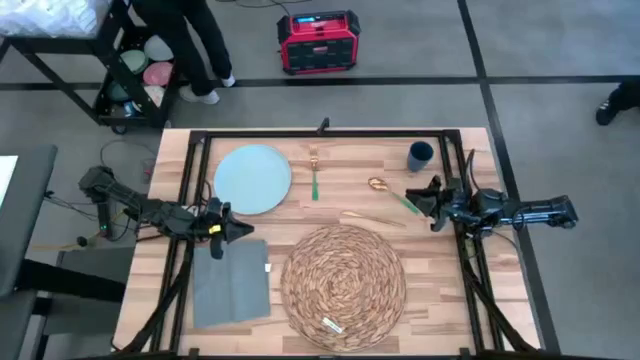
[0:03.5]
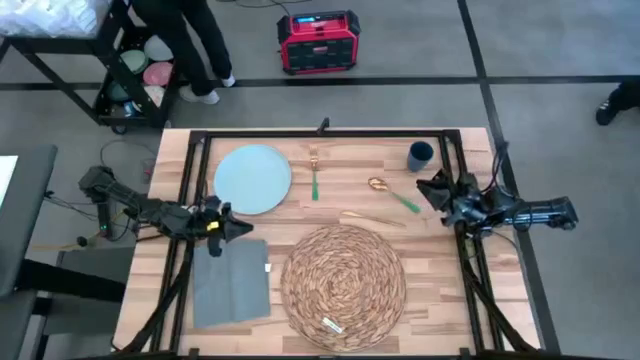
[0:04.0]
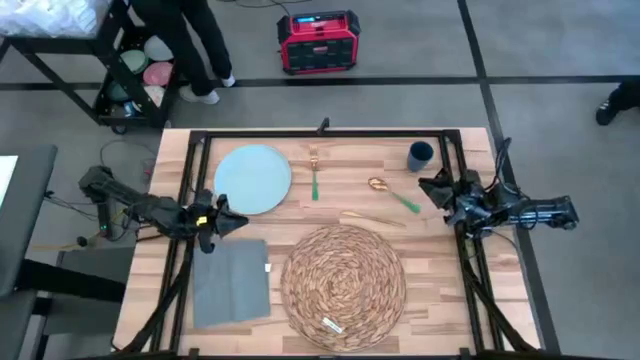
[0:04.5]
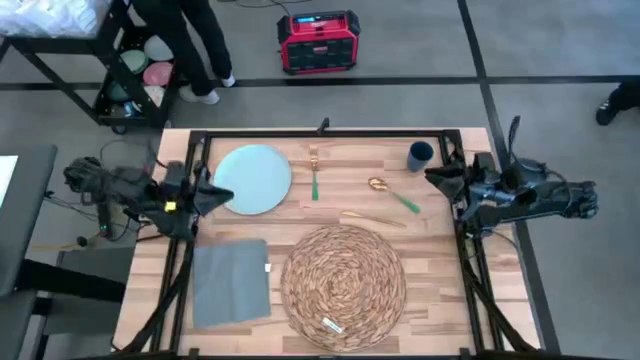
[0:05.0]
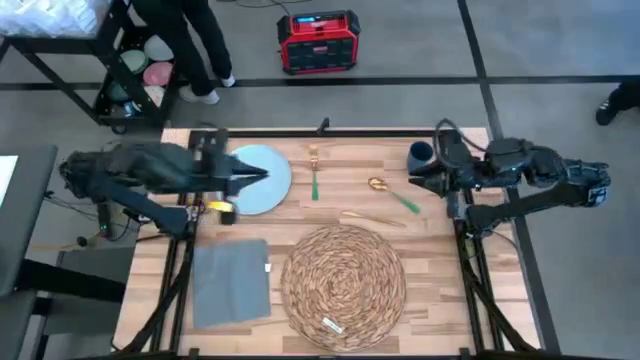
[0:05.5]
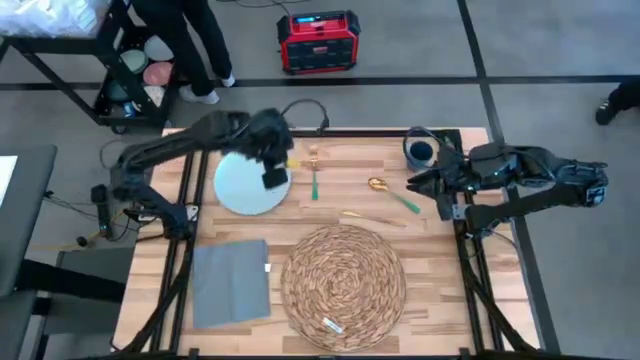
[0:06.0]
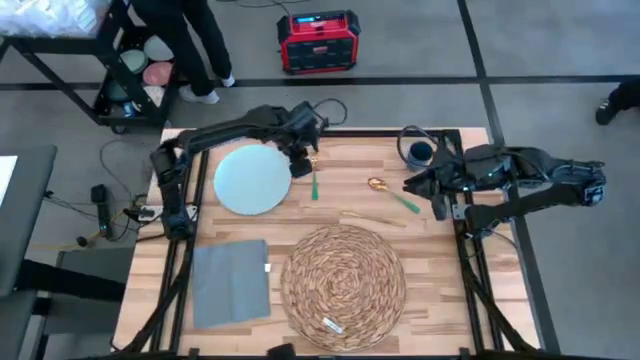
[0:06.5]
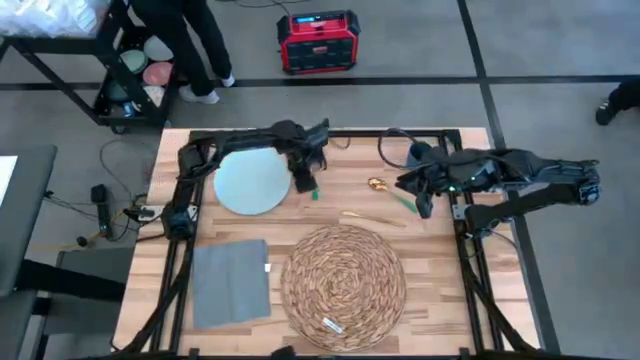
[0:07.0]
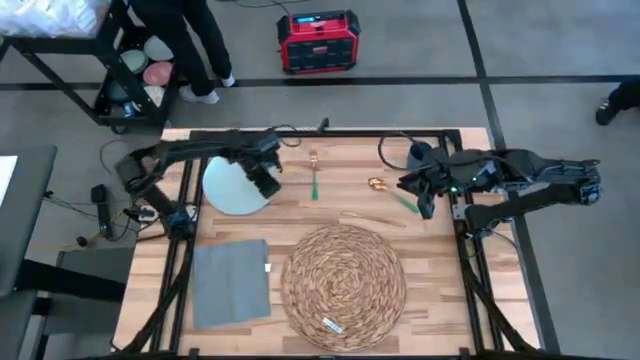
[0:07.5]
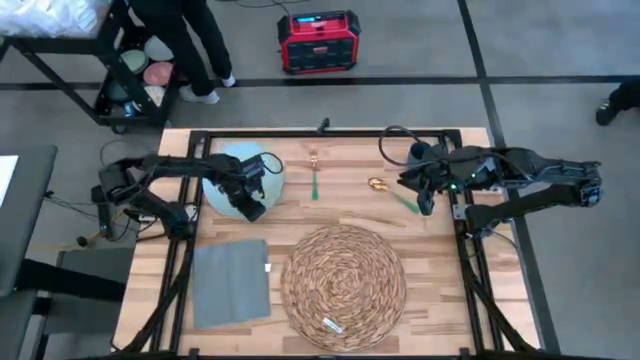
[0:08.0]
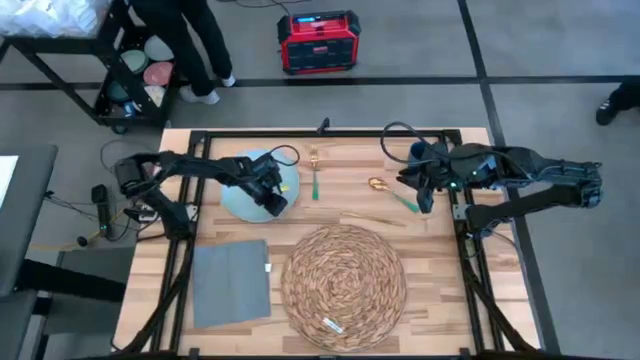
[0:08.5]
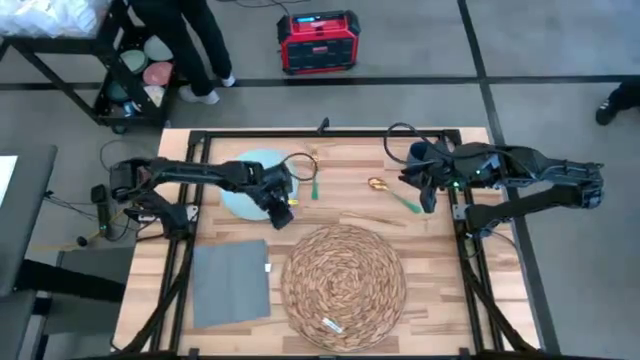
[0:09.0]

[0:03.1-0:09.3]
Task: Set table place
Adjust the light blue plate

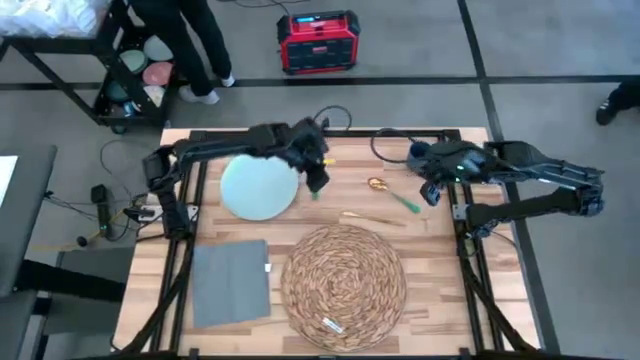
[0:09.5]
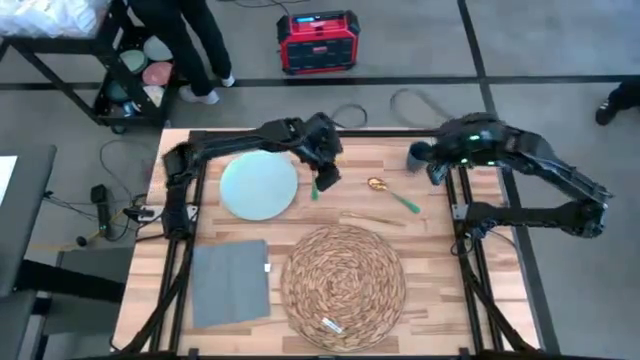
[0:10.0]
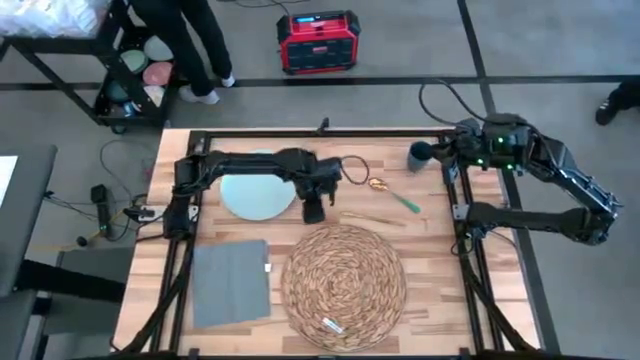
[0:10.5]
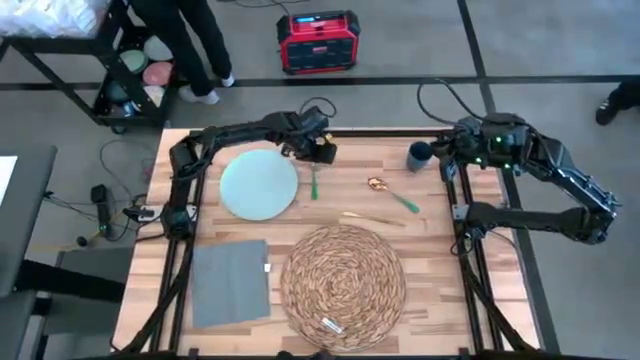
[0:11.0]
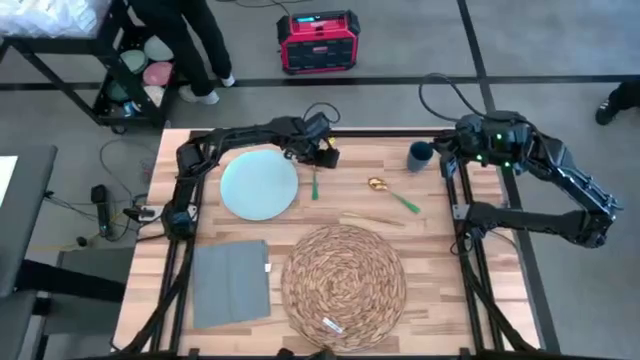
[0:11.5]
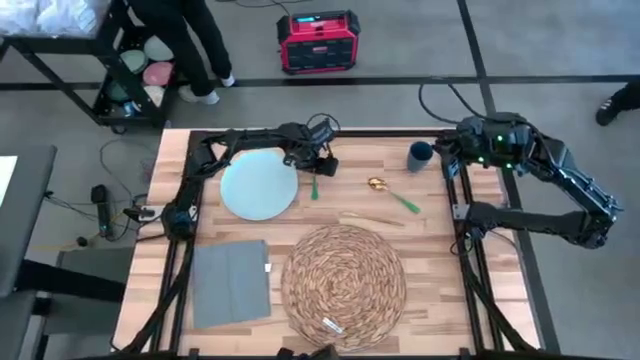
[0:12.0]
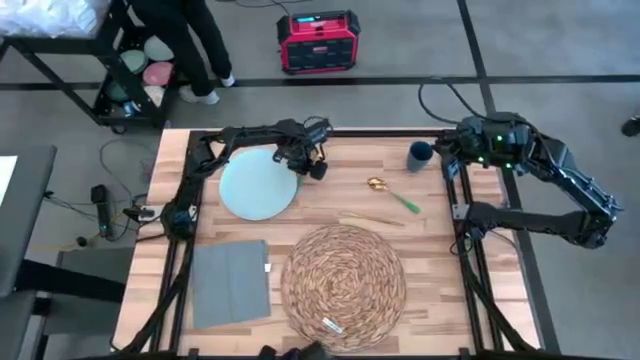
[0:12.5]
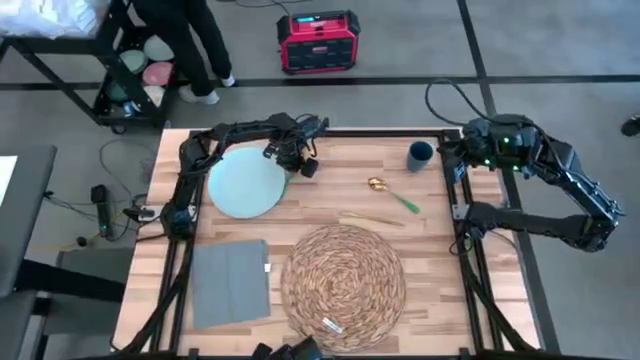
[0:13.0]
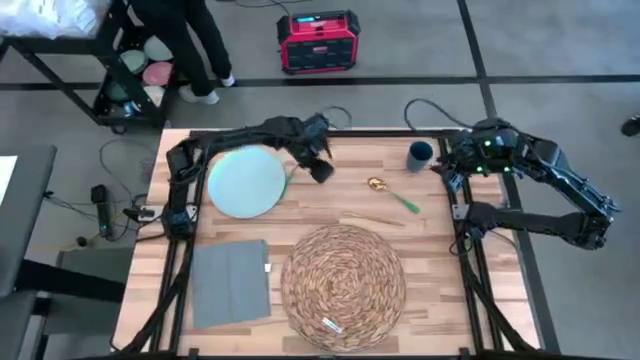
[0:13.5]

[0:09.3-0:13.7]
Adjust the green fork

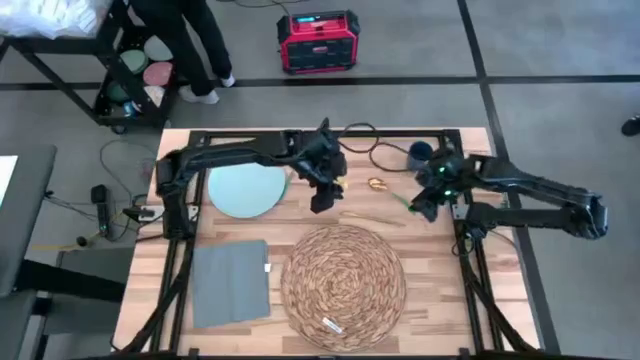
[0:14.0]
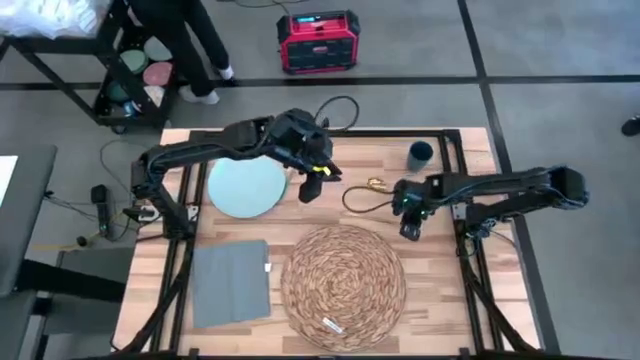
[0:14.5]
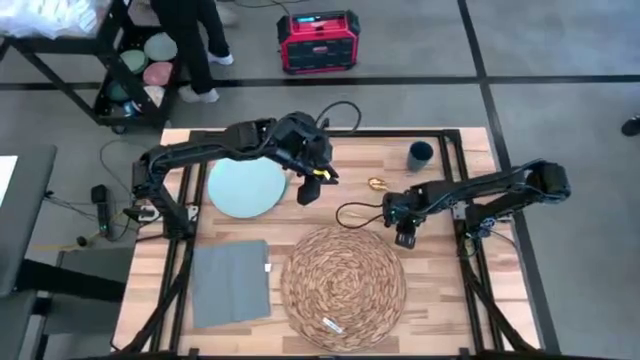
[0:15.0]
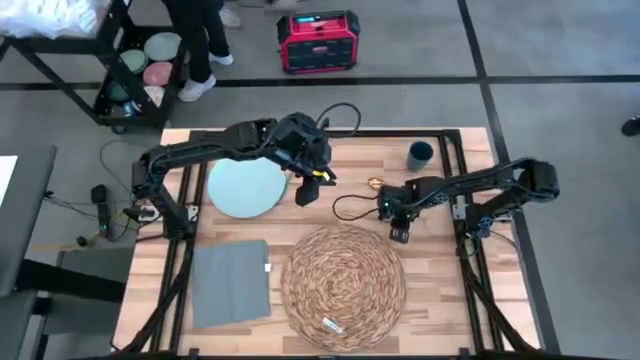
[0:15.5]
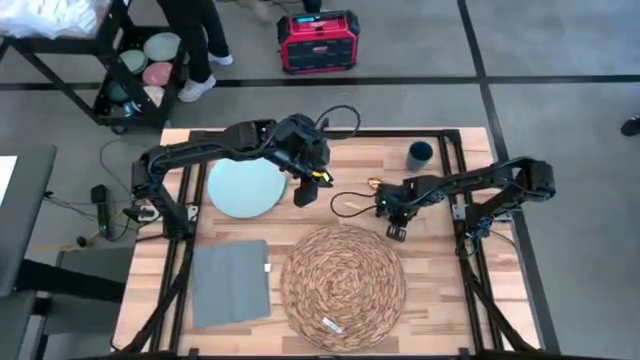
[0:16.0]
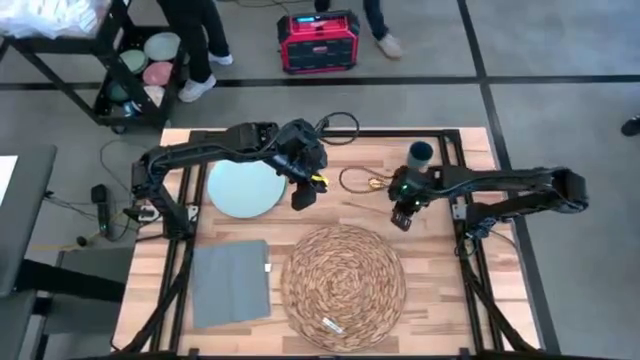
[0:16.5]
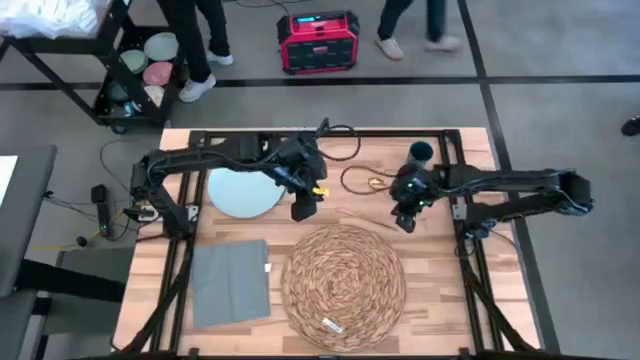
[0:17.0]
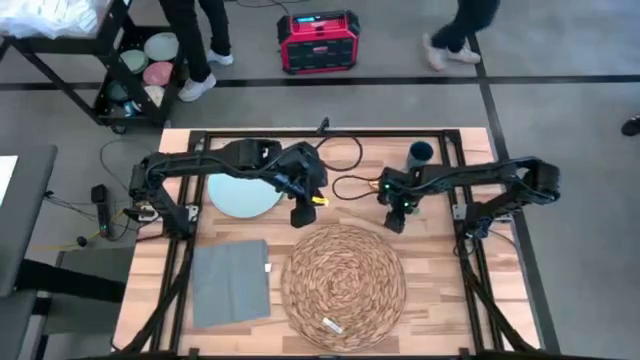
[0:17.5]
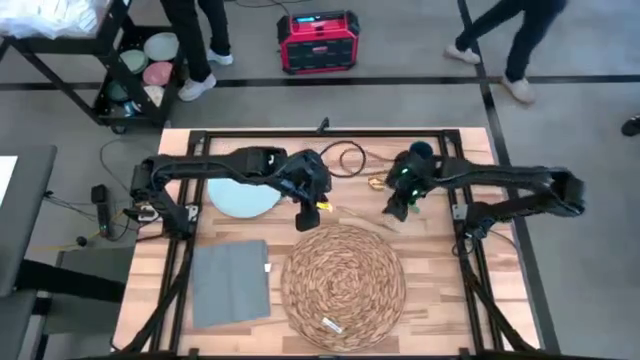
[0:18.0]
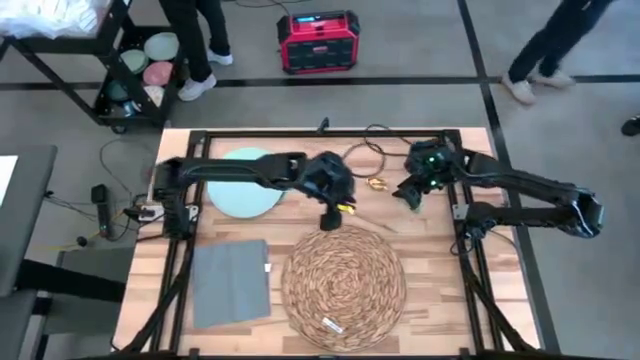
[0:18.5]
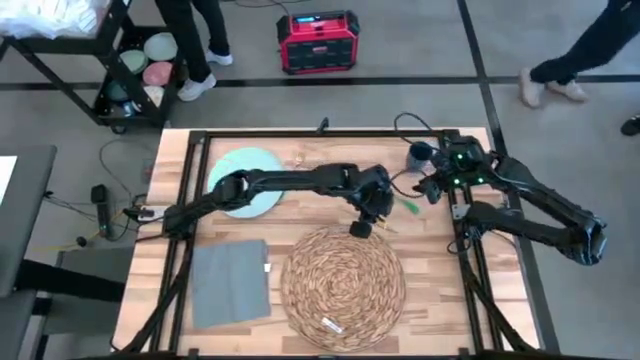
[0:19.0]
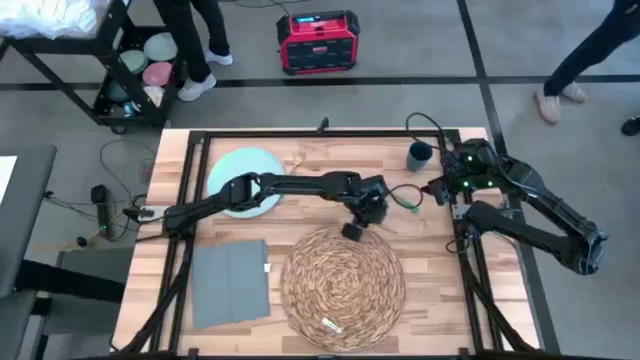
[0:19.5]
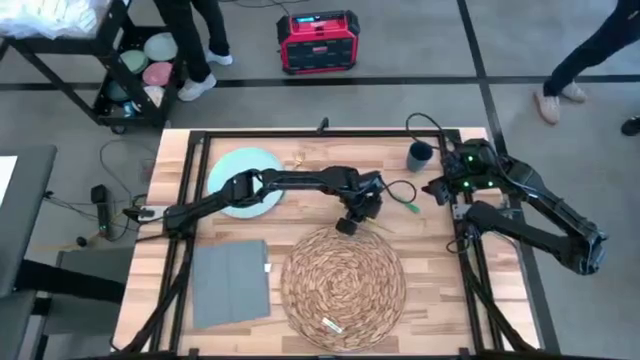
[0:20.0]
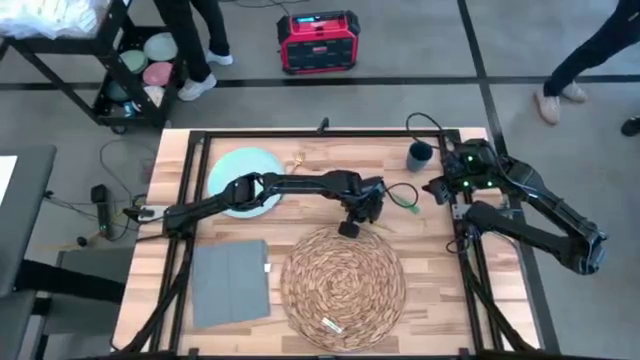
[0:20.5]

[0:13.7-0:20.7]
Put the gold knife on the brown woven placemat

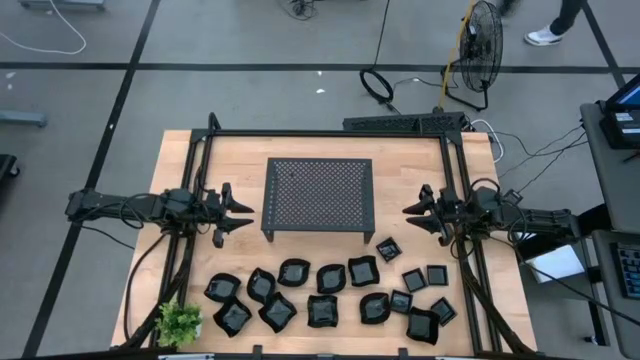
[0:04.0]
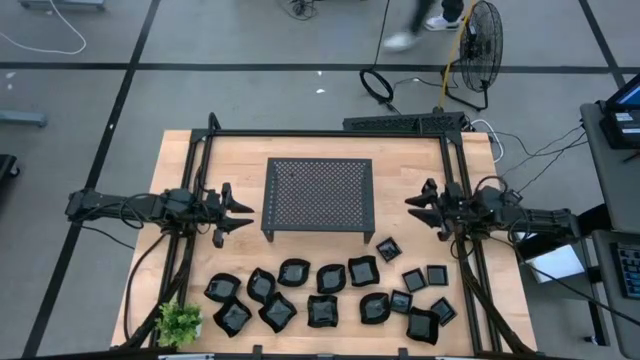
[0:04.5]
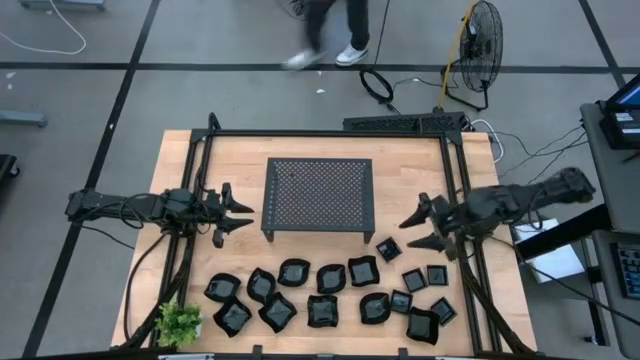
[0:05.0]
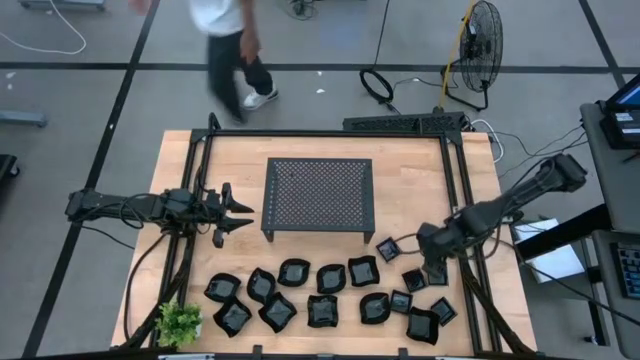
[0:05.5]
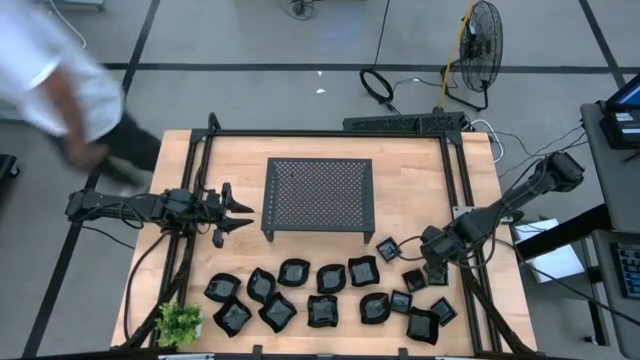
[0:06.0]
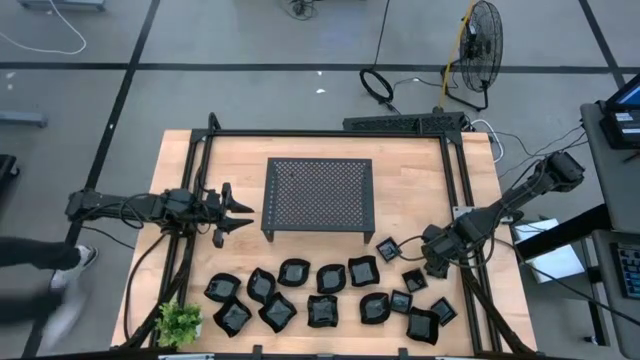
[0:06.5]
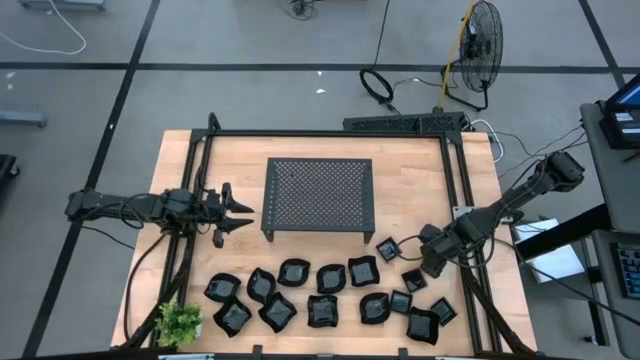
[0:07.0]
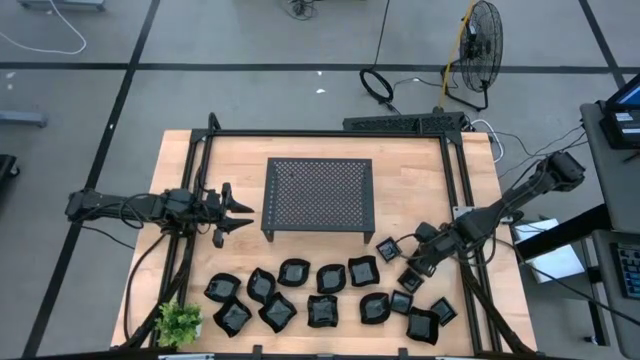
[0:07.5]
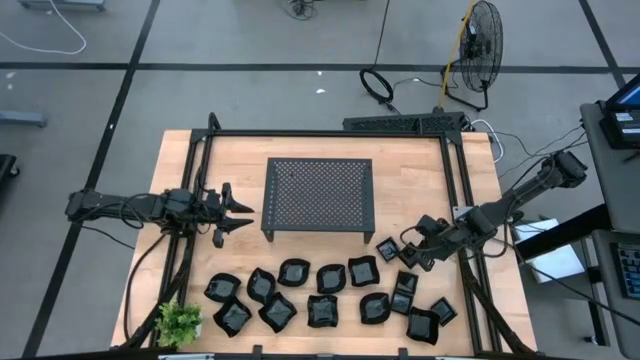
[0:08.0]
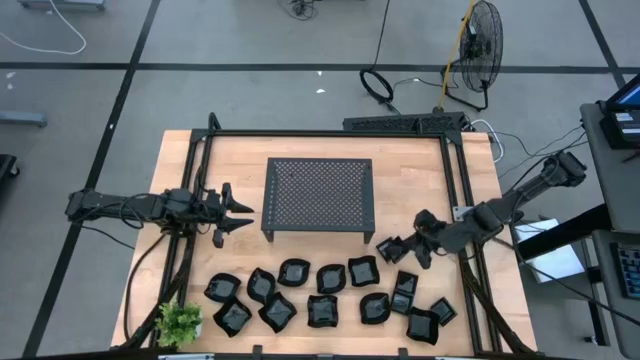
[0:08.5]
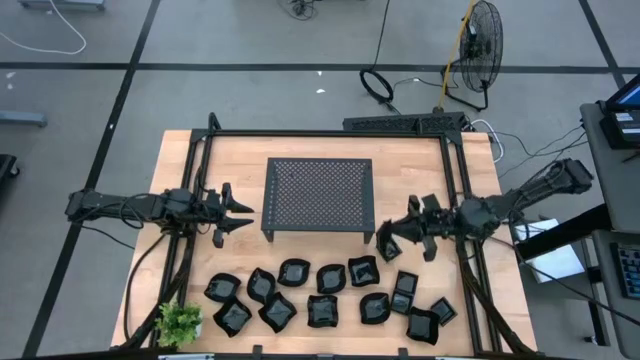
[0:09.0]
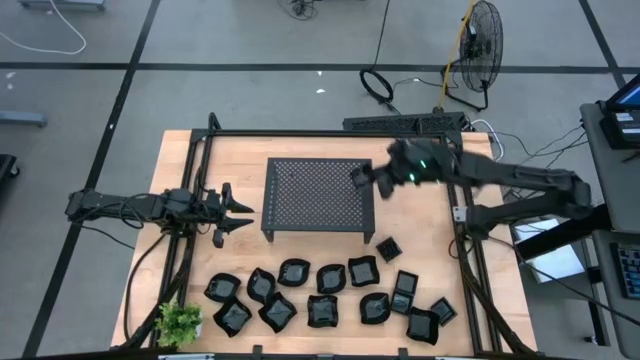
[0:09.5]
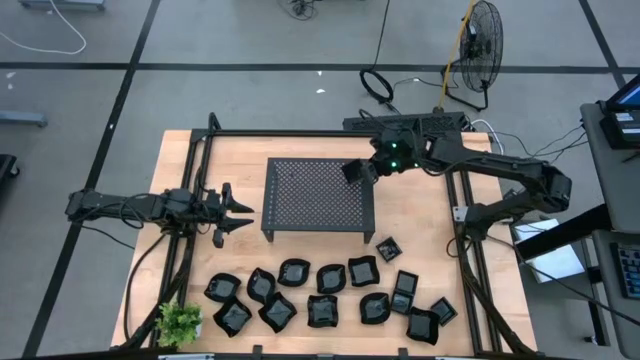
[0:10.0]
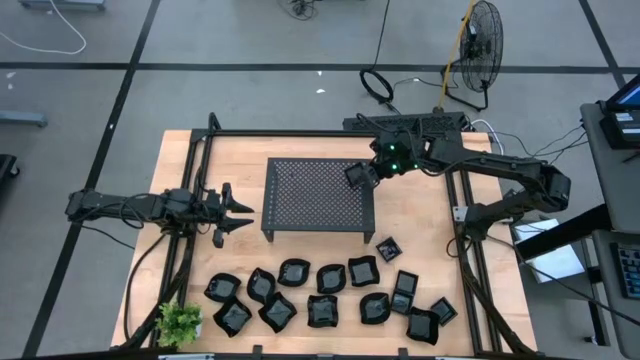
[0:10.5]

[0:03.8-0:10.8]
Task: Pick & Place Mini shaped plates
Put the square plate on the shelf
